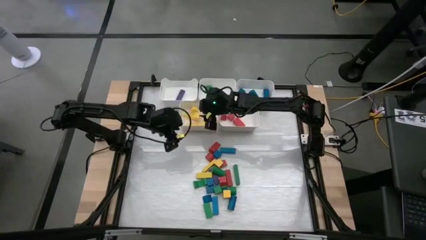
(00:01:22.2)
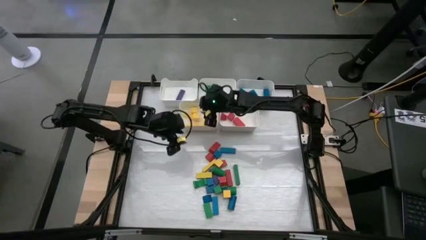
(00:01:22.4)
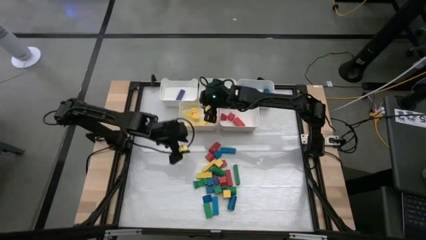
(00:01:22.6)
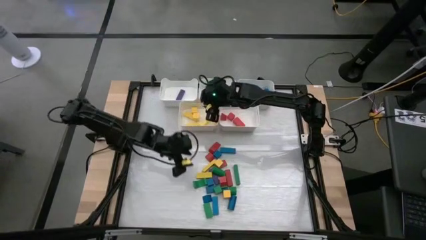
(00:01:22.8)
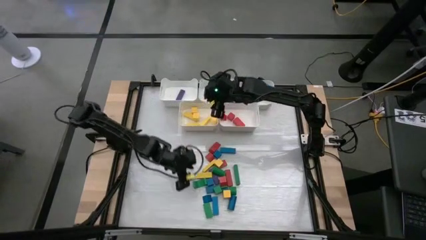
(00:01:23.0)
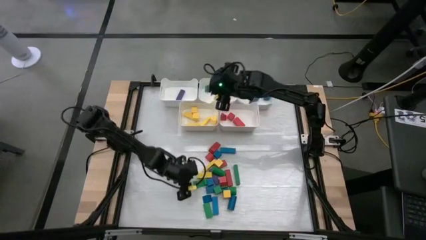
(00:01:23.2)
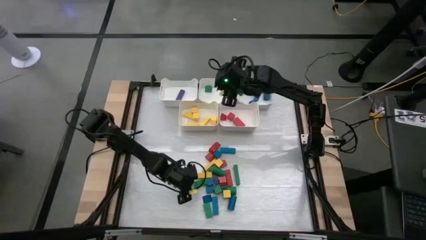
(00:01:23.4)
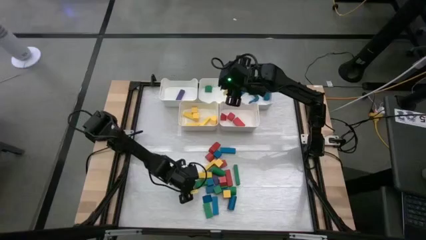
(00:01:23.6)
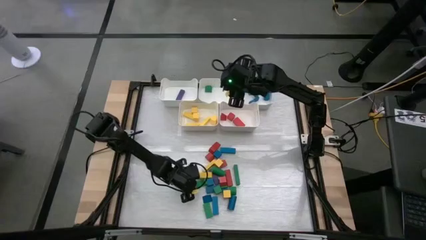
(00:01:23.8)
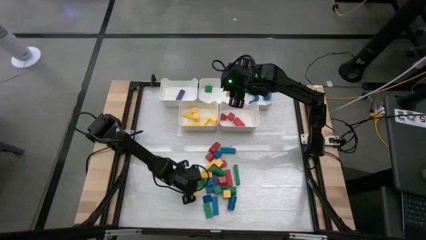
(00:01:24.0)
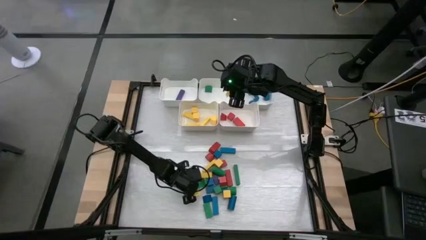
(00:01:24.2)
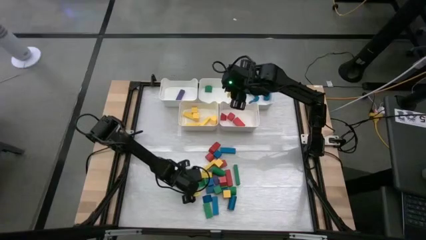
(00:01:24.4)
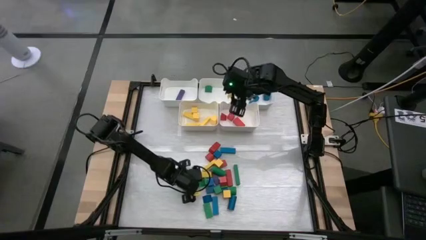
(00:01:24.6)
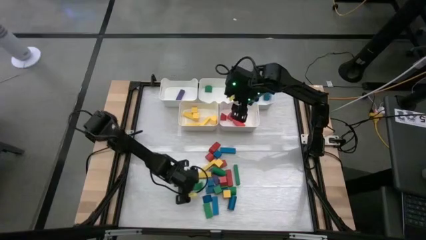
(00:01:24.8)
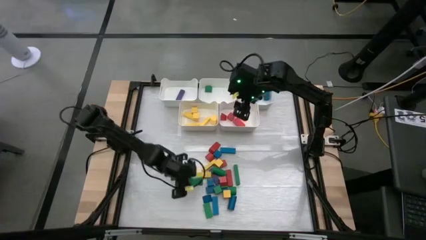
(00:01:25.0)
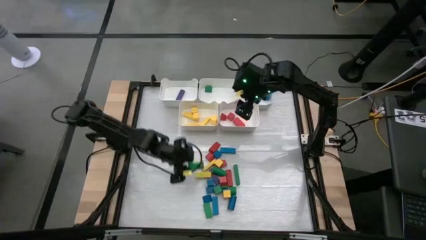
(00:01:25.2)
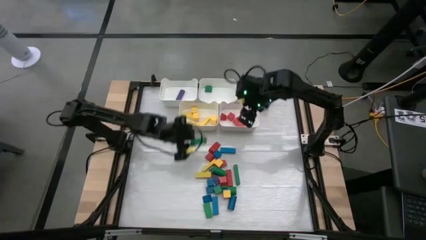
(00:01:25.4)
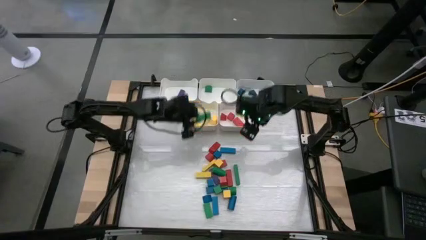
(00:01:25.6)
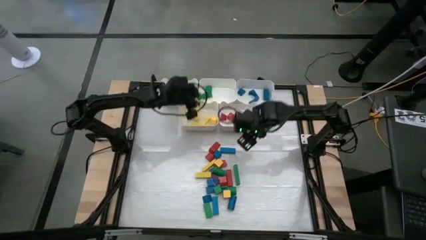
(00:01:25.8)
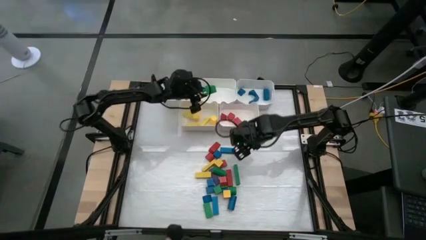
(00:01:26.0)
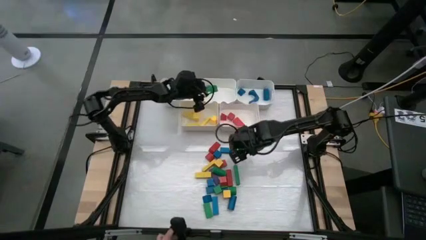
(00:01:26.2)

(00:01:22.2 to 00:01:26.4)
Task: Sort blocks
Put the green block into the top center bin

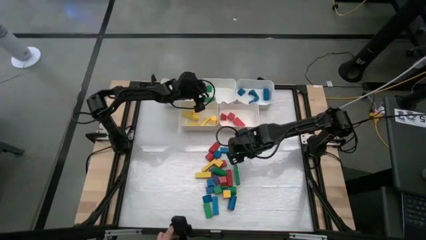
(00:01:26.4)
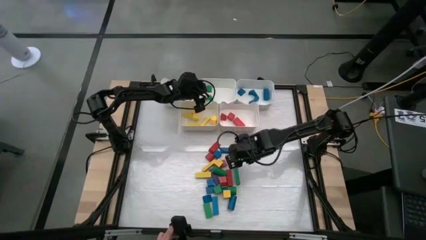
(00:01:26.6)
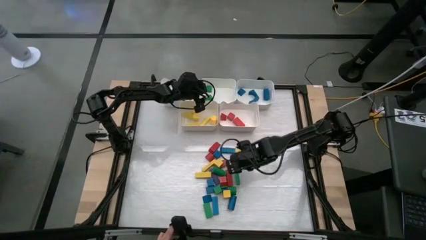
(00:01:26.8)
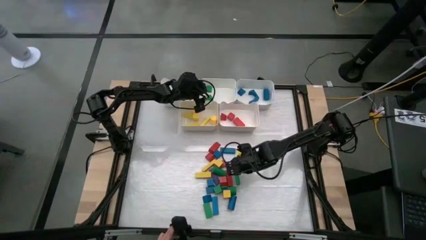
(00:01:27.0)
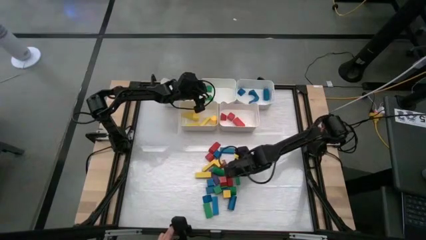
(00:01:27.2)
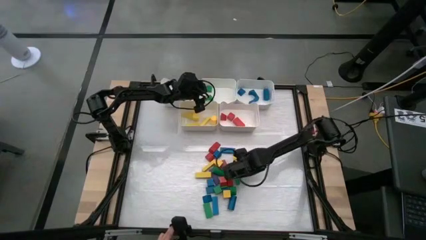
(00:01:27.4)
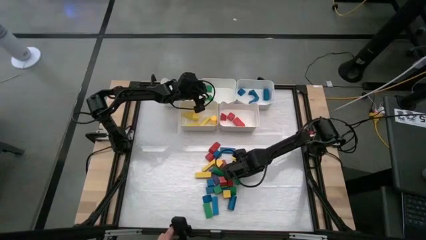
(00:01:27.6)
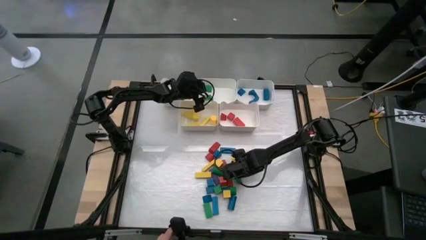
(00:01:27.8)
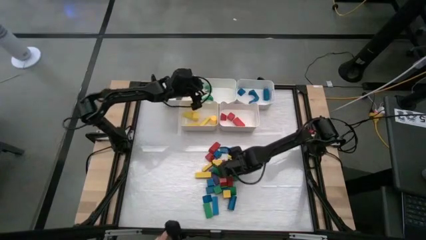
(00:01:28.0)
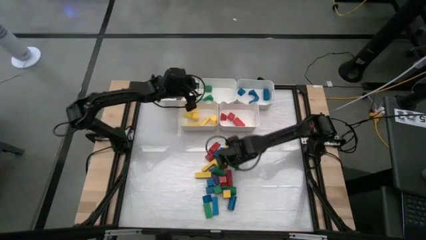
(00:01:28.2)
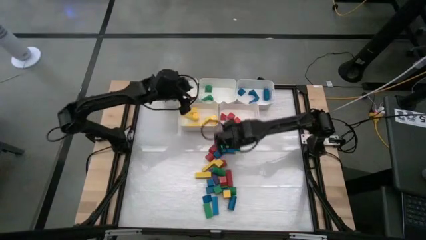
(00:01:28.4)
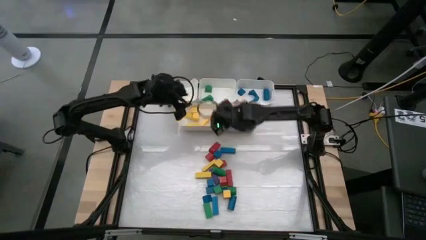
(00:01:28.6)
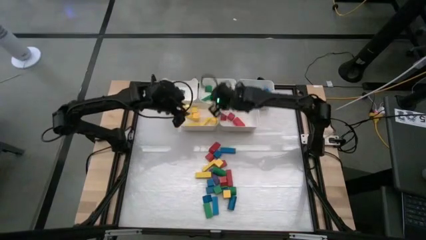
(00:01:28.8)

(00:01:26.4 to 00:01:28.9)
Put the green block into the top center bin

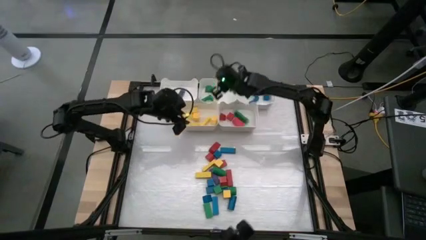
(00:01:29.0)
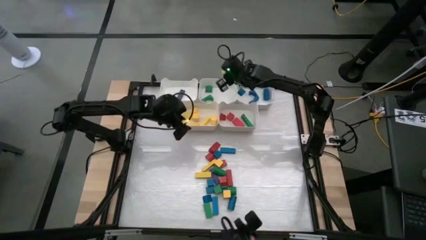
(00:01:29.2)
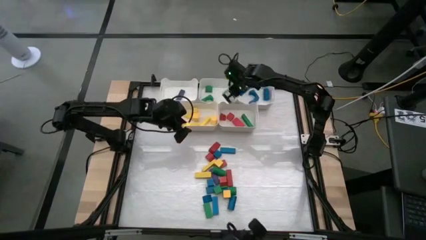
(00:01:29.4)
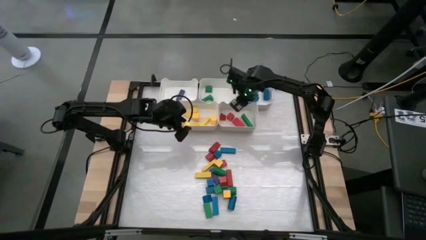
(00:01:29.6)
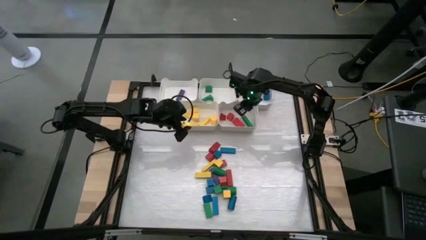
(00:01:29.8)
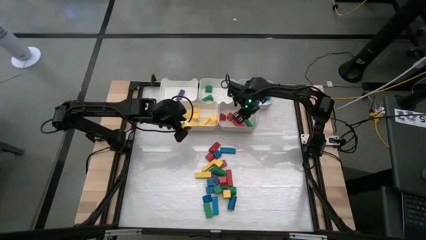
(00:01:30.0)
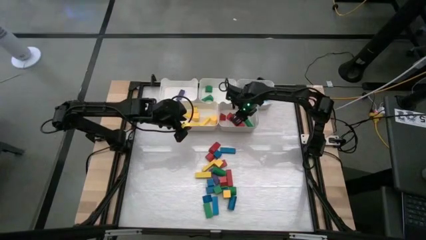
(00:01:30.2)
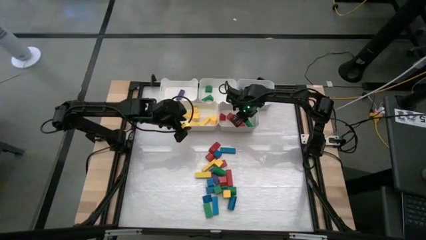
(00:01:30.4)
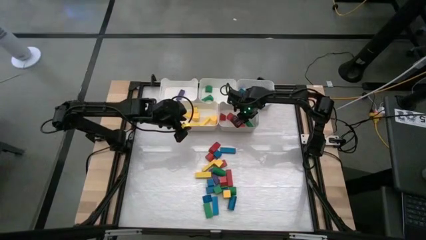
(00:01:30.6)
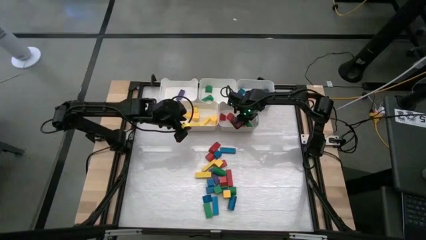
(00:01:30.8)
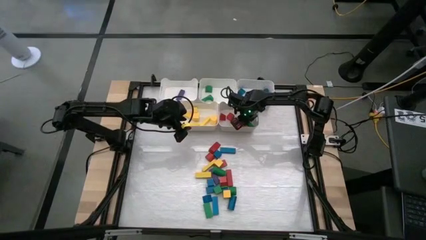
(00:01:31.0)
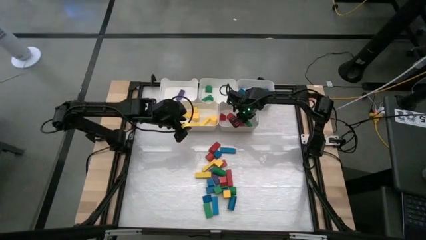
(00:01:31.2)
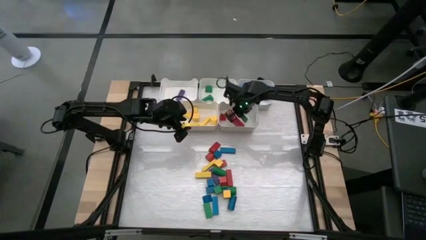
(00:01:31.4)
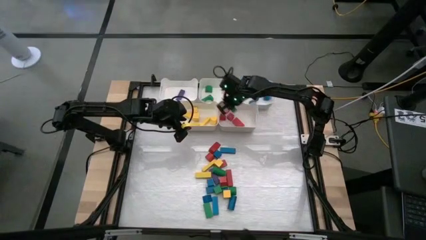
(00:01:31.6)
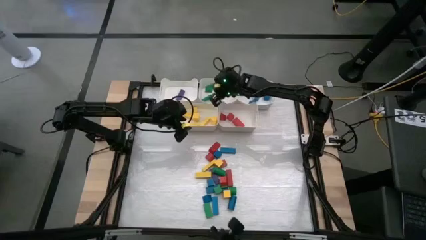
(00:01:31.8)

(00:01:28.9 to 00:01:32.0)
Put the green block into the top center bin

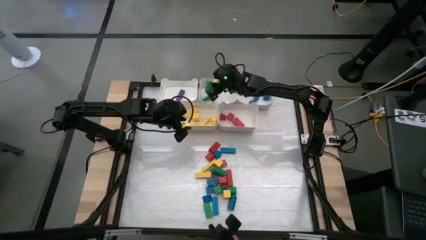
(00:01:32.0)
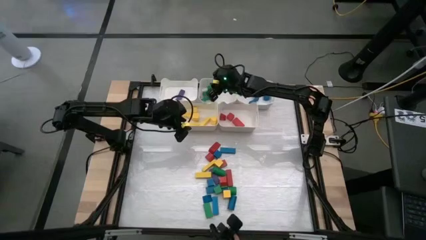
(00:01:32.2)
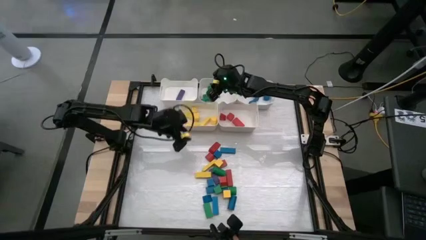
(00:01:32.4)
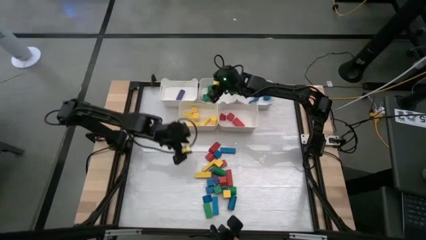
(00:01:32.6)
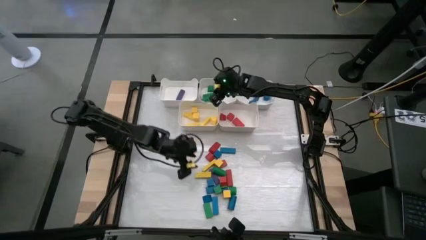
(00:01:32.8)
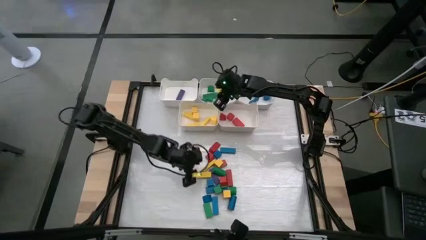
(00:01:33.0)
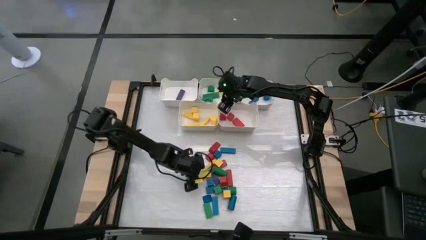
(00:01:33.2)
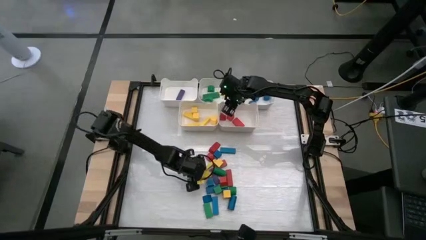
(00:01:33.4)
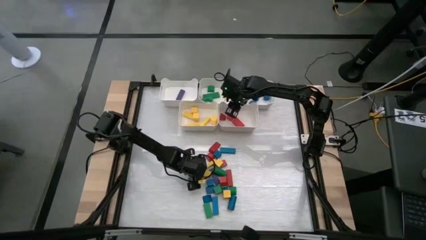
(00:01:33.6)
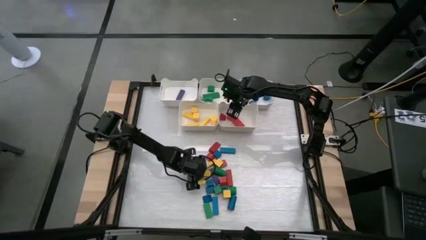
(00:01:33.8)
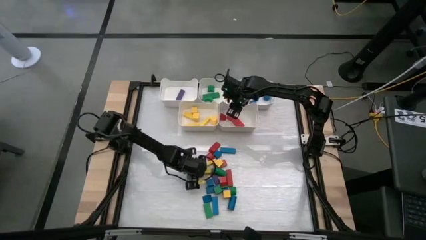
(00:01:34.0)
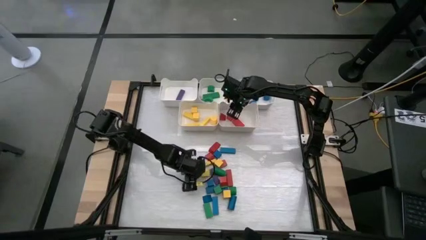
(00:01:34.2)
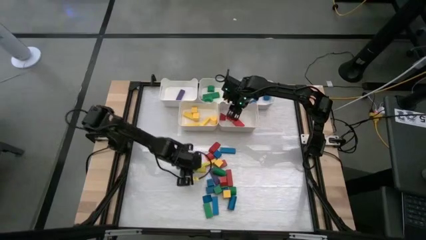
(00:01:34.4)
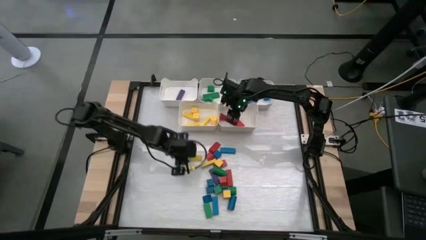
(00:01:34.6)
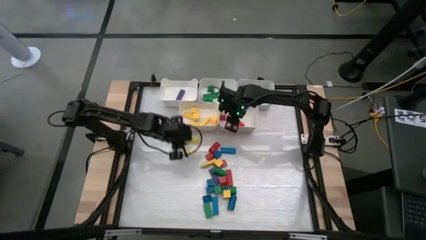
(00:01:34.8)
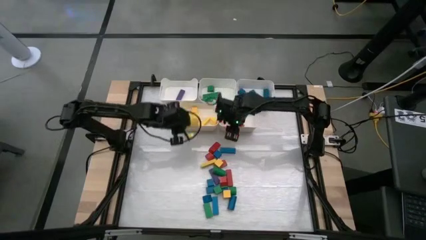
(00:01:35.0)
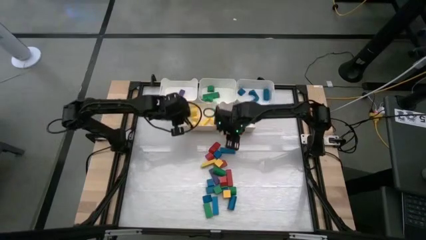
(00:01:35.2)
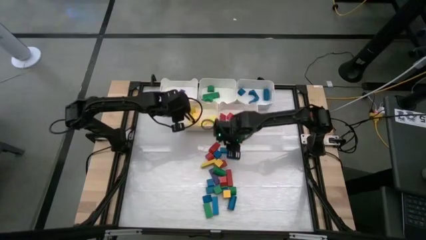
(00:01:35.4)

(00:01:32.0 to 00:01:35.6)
Put the yellow block into the bottom left bin

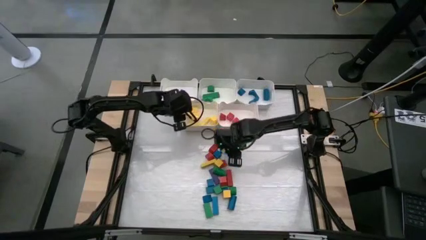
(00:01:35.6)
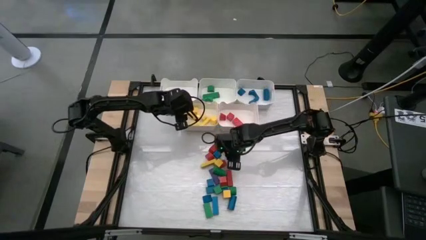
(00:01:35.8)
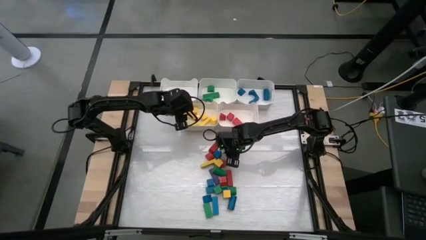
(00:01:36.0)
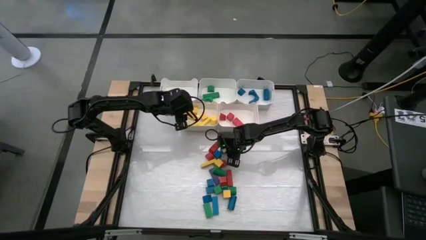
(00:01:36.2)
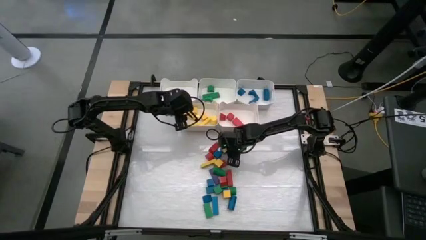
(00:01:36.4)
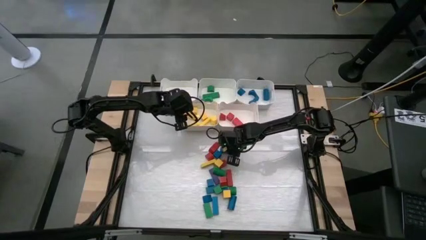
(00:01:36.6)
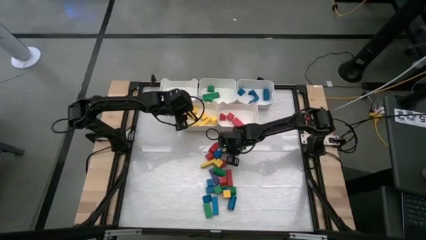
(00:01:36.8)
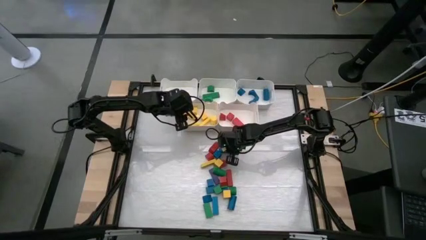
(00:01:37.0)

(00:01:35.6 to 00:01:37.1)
Put the blue block into the top right bin

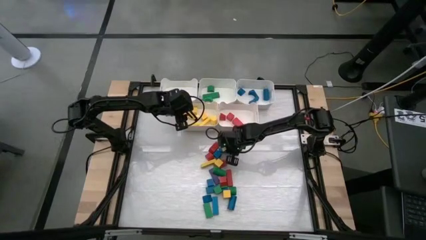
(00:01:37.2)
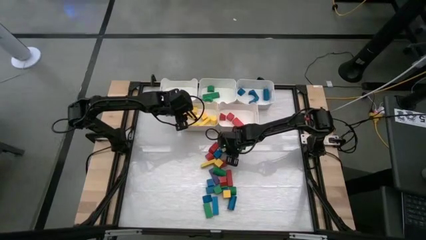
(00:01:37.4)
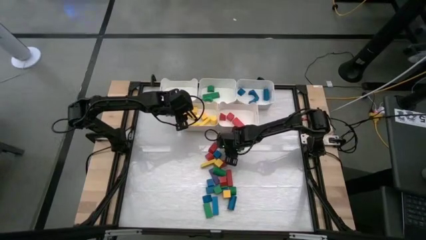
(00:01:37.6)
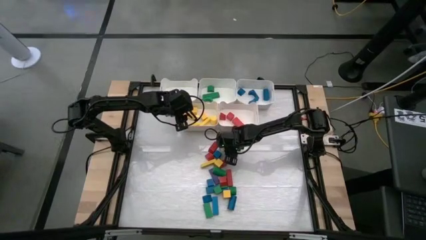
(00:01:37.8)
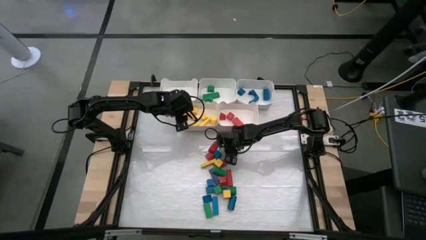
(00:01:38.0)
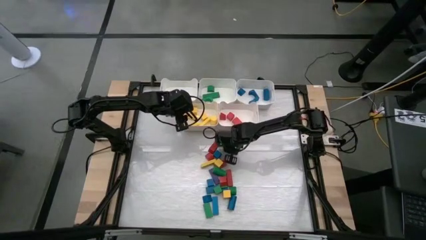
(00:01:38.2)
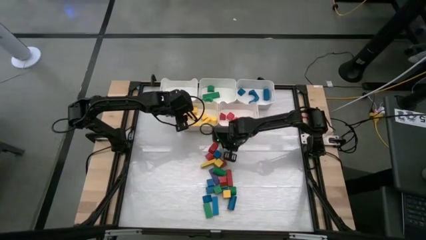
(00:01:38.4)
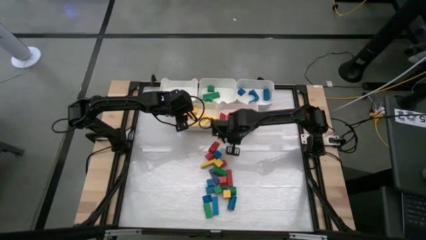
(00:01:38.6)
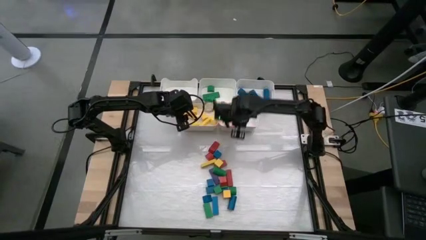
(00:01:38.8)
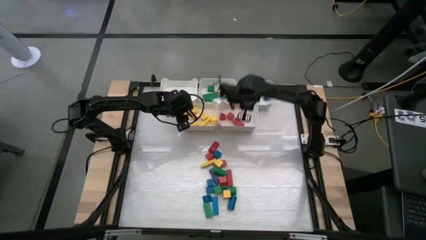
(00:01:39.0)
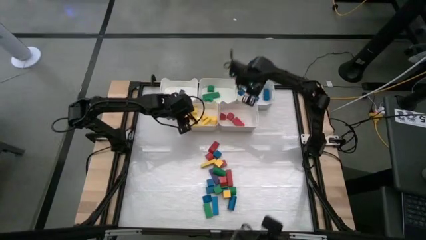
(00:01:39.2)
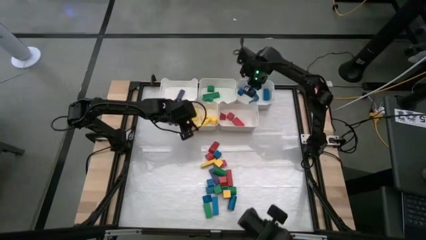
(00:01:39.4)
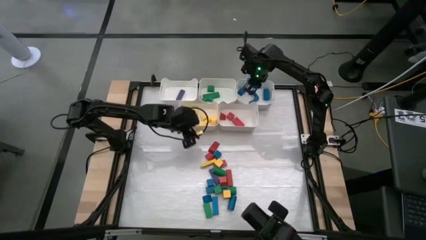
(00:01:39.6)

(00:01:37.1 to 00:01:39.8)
Put the blue block into the top right bin
